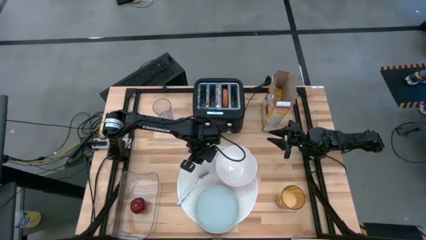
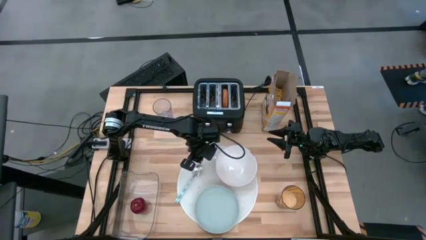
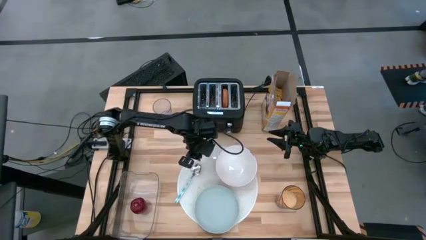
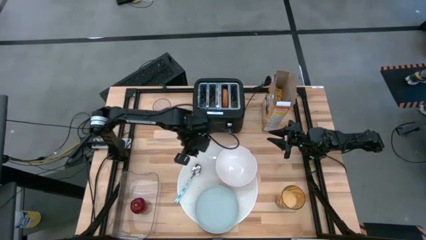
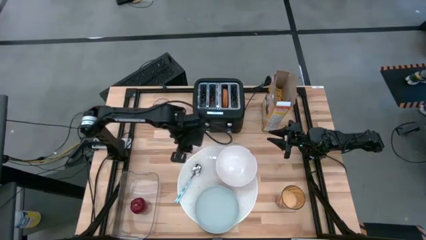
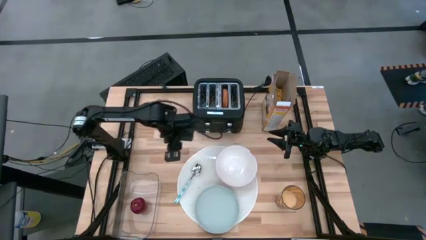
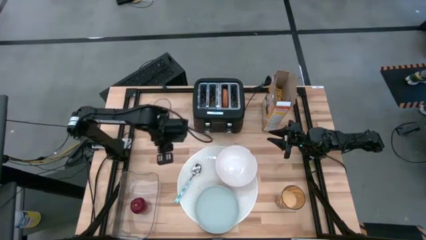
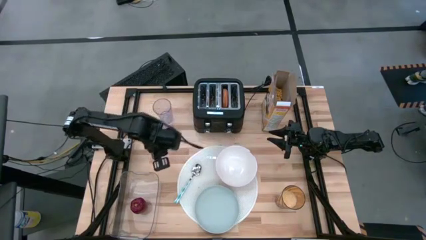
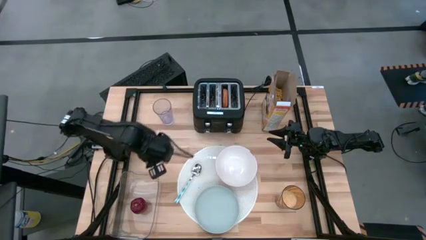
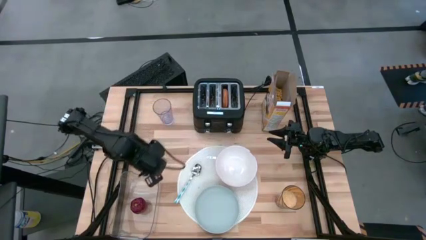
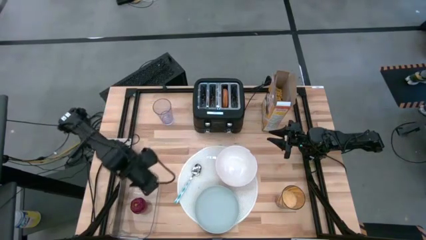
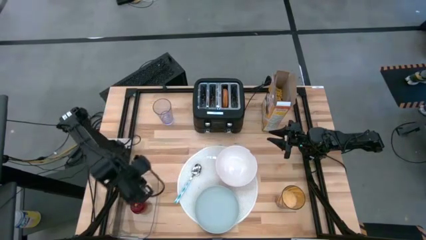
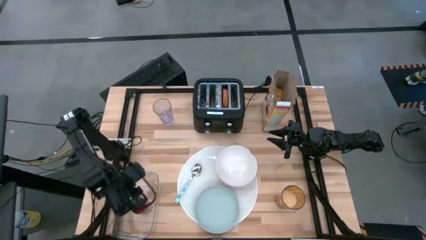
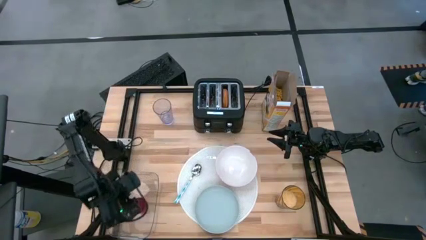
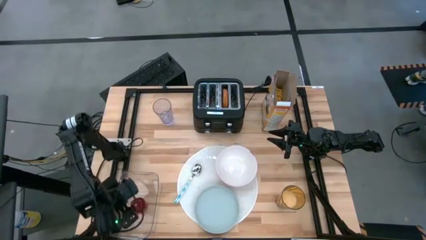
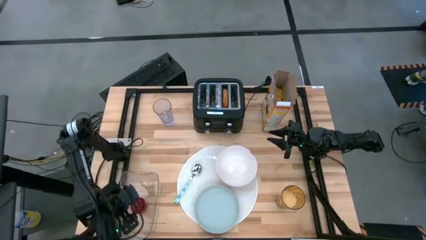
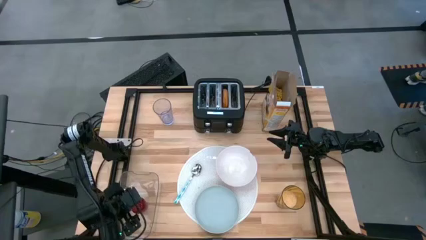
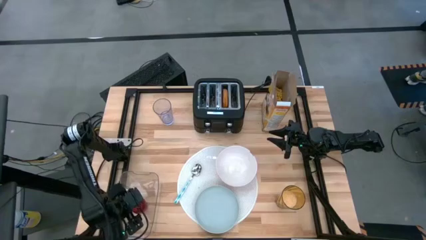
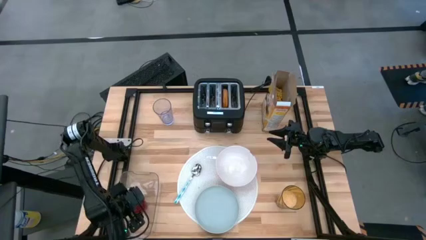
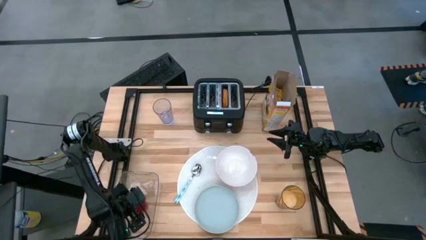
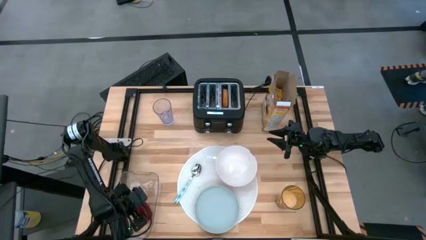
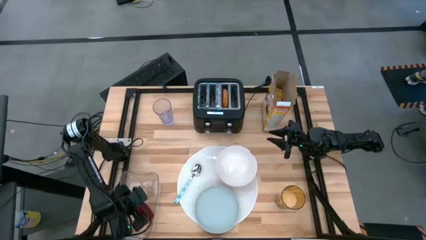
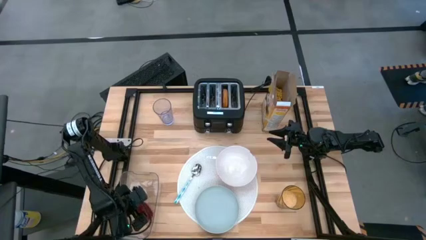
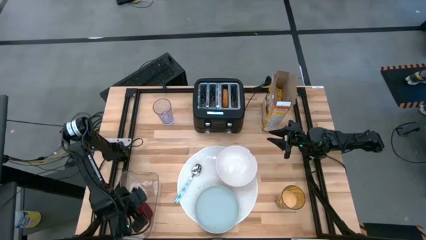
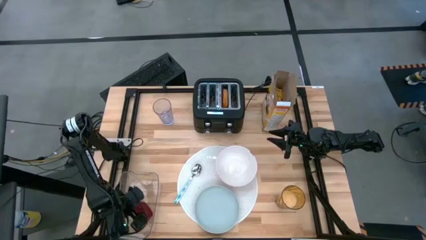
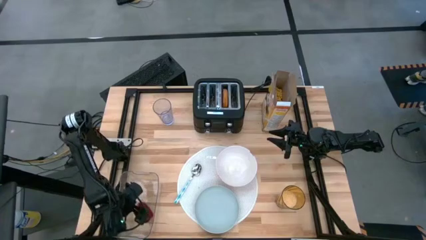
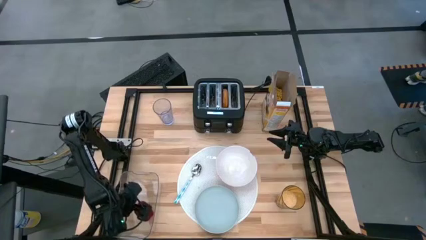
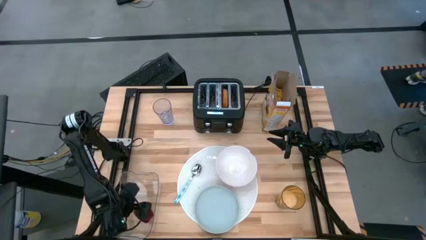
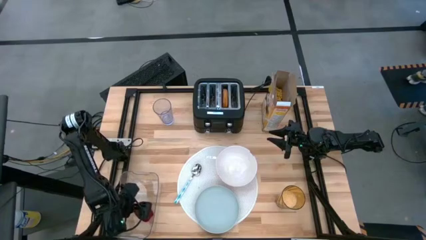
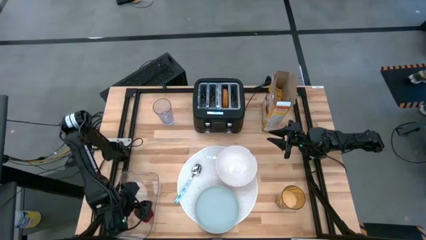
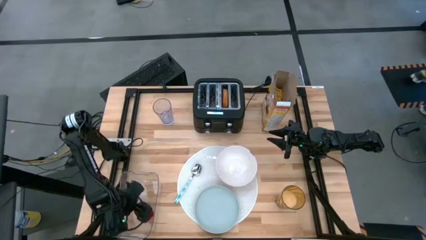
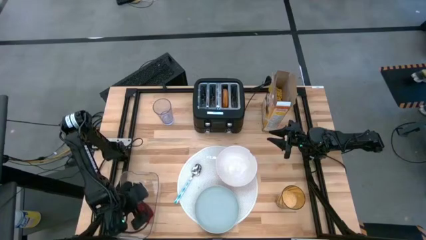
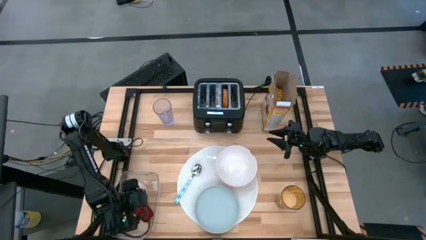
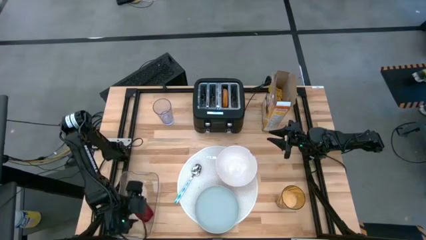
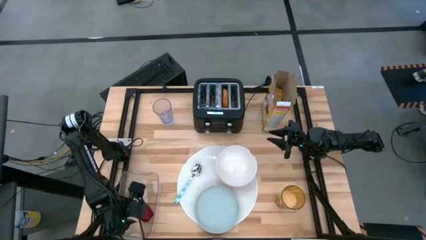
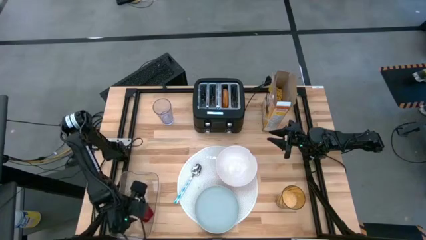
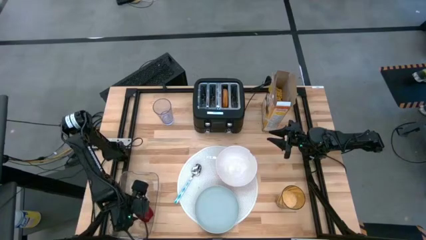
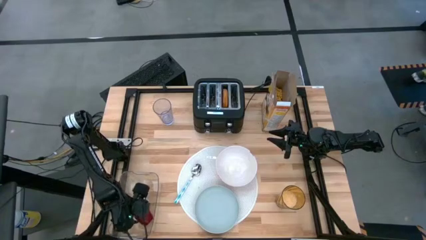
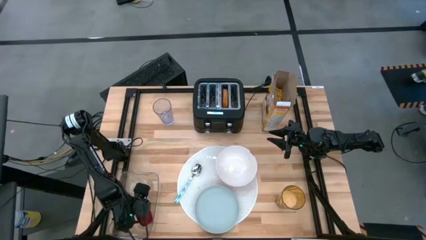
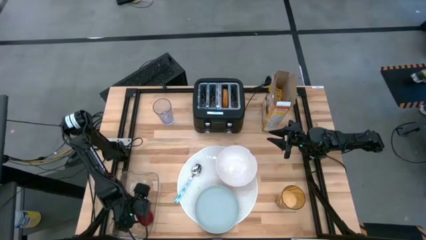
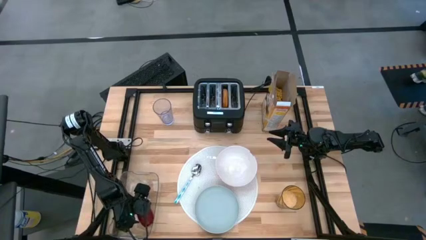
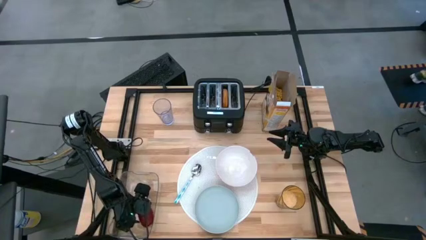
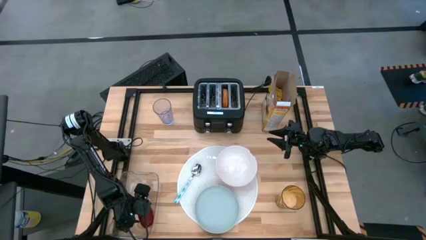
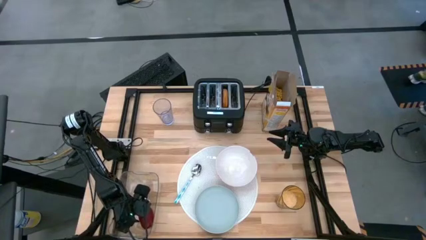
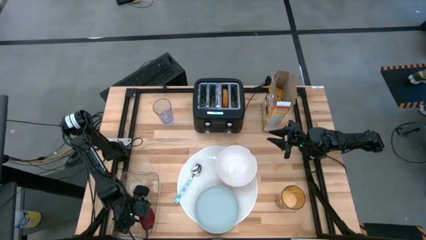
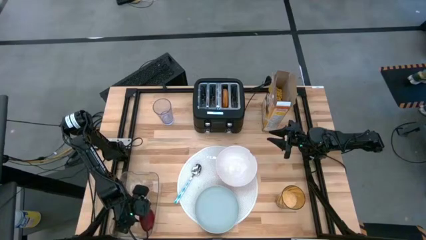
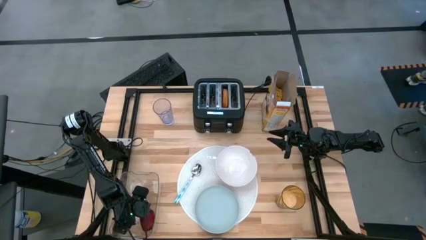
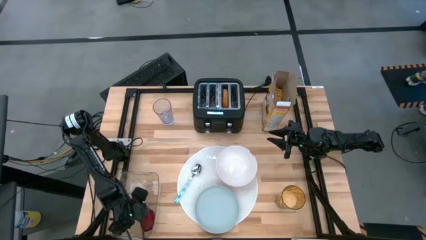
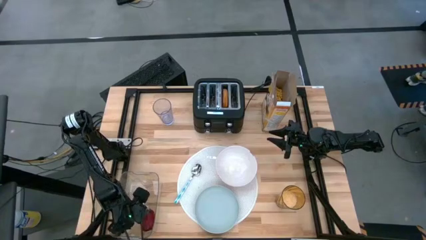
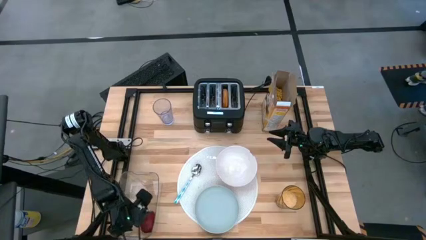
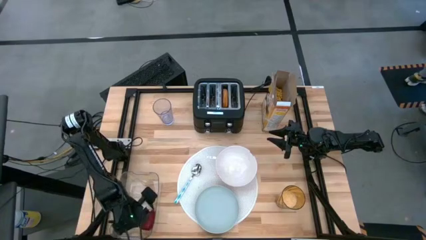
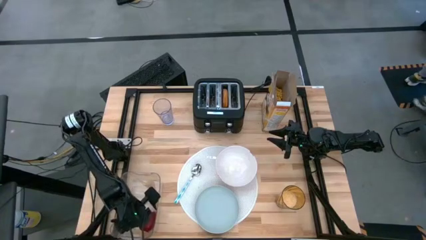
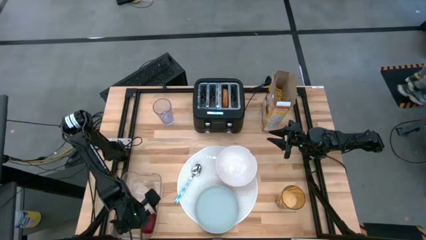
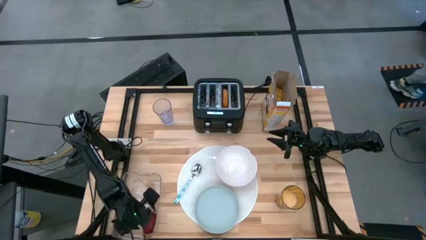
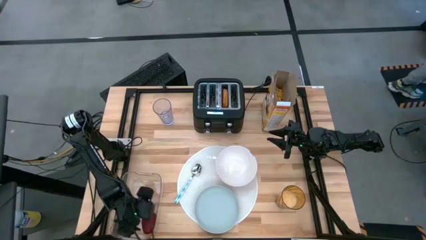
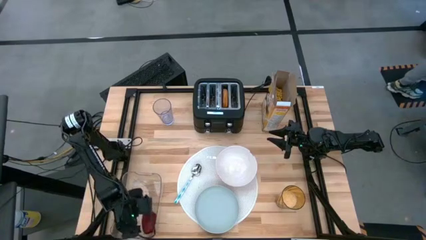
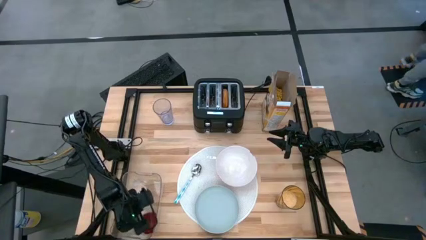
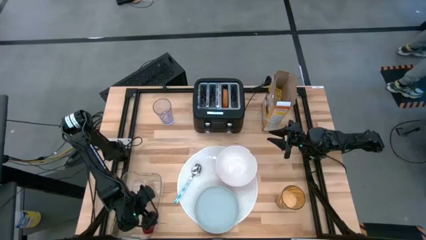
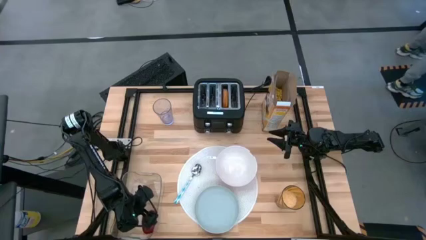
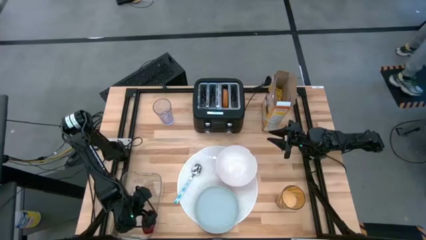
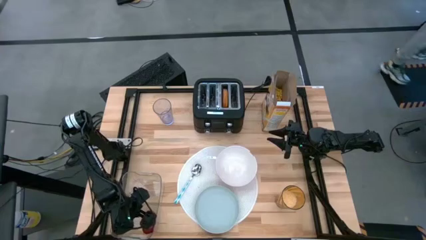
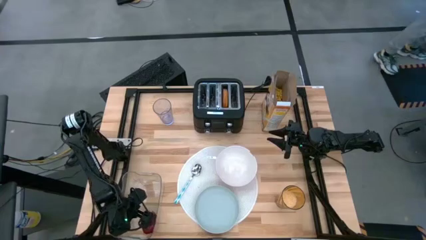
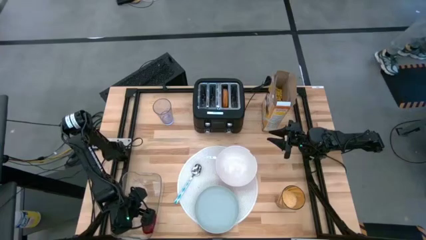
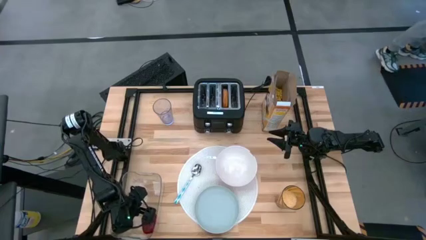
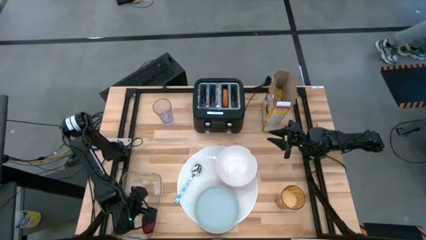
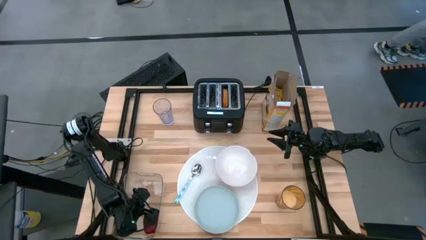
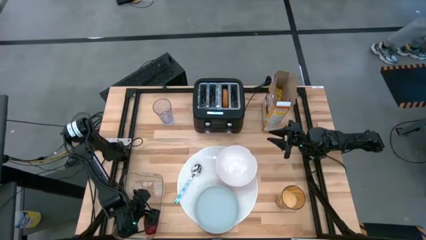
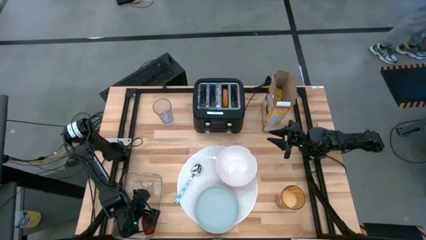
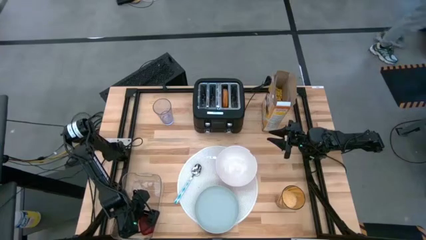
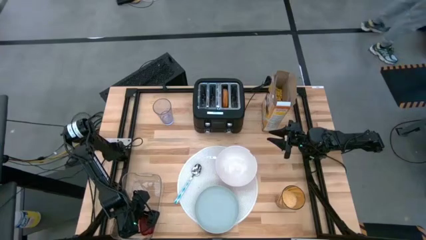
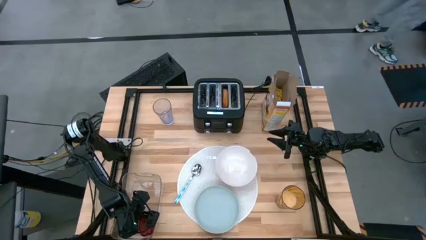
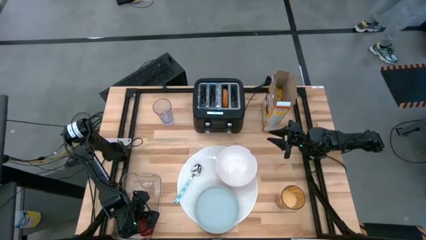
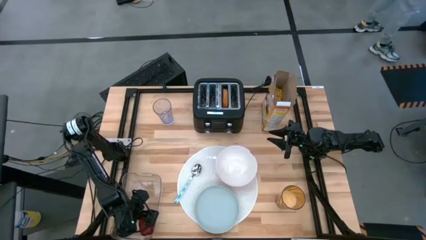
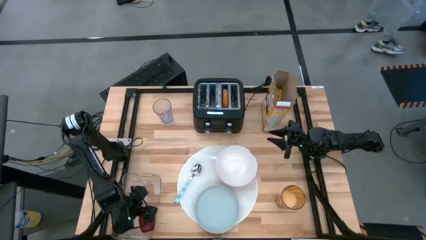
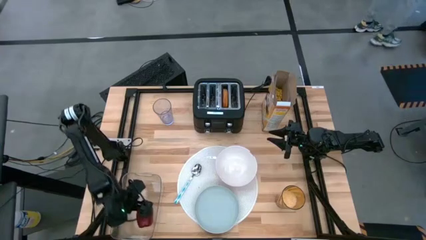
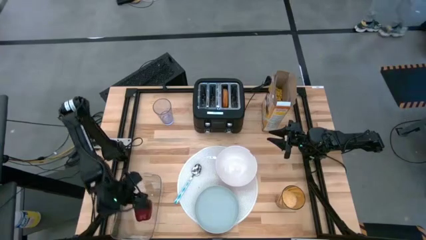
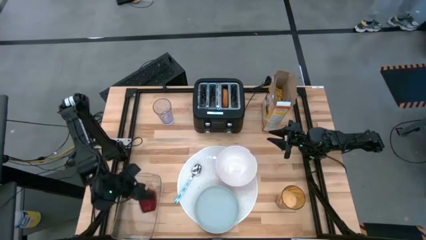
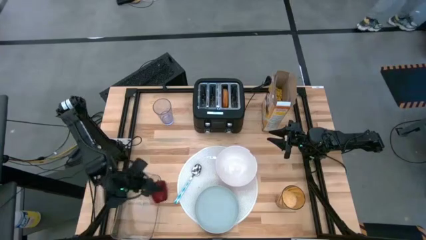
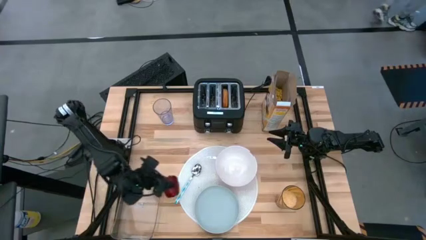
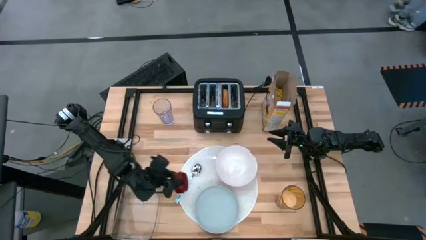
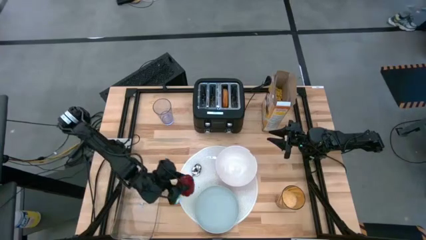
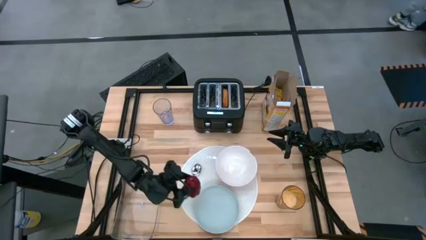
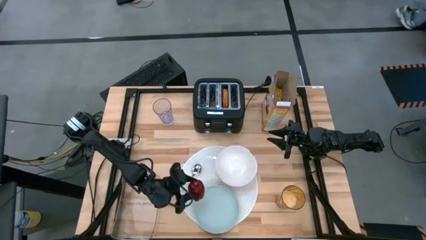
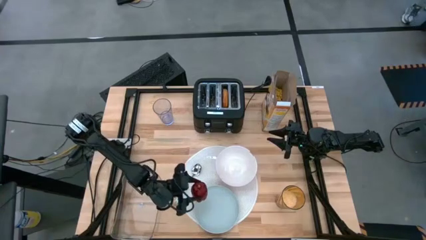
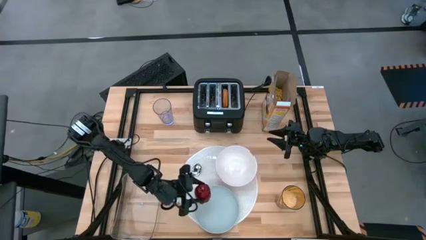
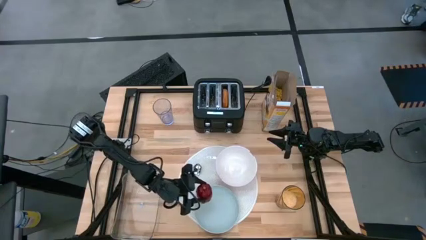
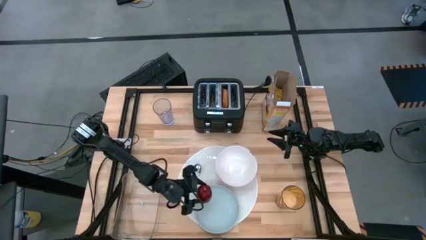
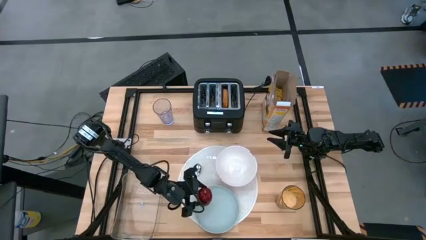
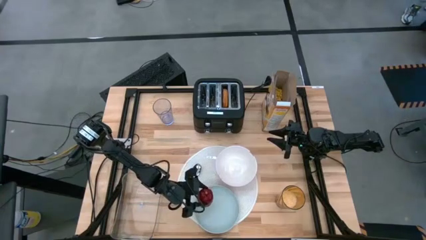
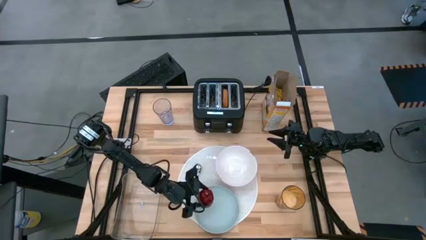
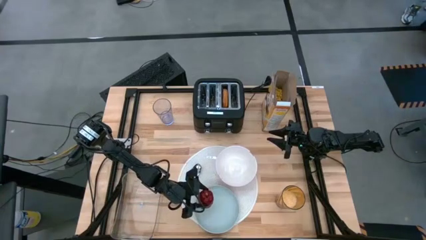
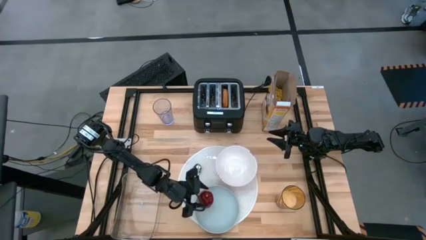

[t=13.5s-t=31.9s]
Task: Arrange a breakfast setting
Put the red apple on the gray plate
